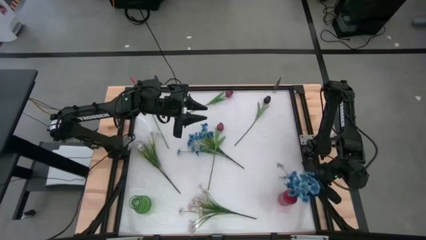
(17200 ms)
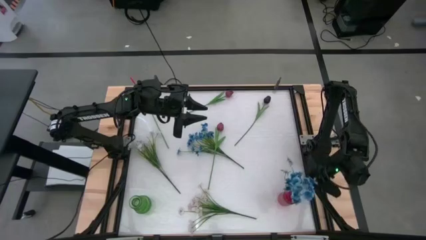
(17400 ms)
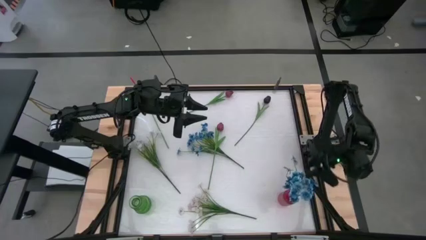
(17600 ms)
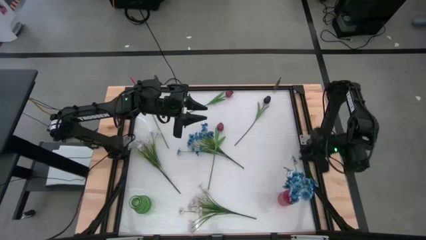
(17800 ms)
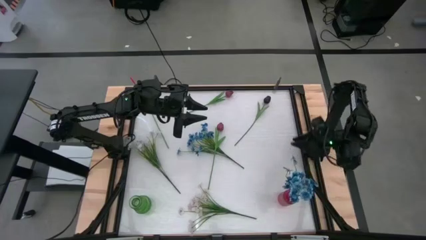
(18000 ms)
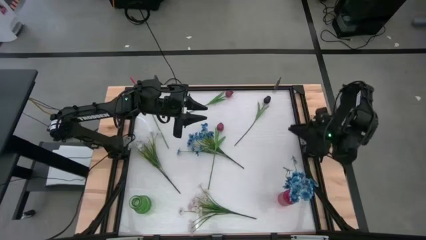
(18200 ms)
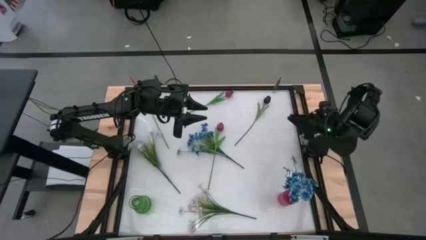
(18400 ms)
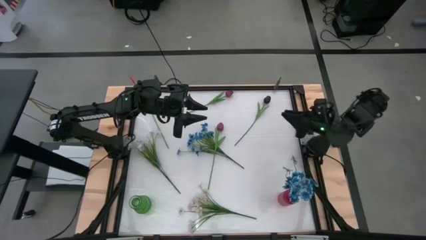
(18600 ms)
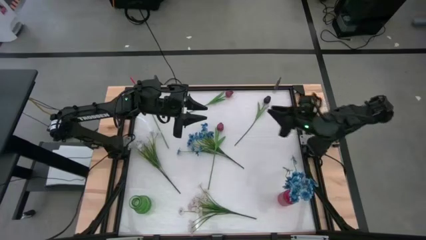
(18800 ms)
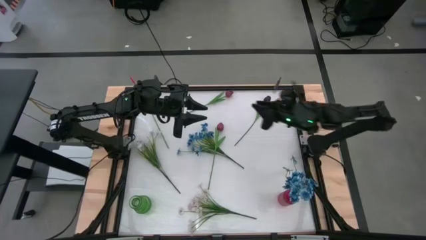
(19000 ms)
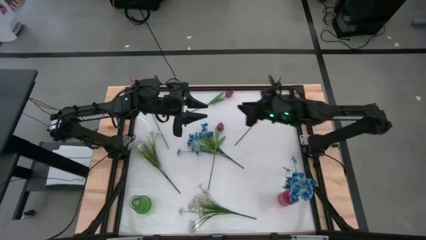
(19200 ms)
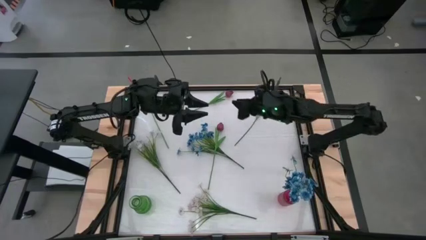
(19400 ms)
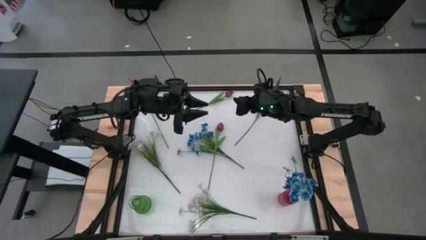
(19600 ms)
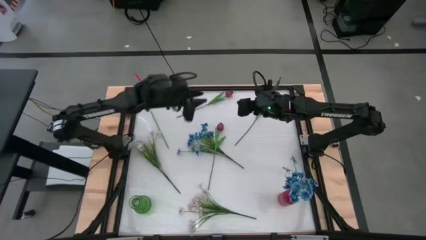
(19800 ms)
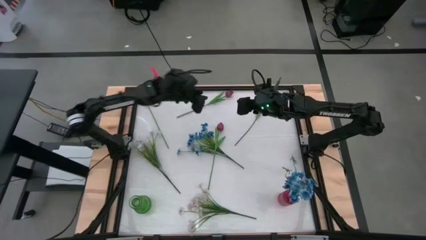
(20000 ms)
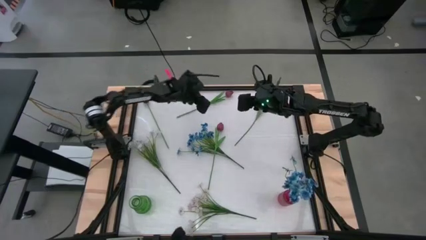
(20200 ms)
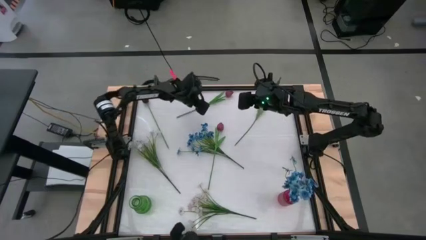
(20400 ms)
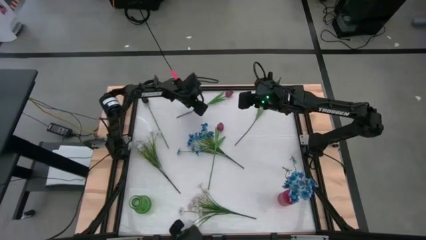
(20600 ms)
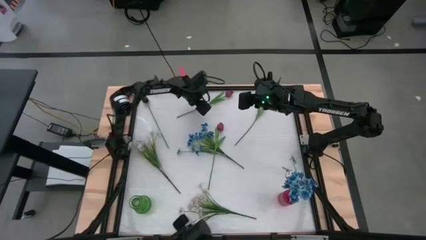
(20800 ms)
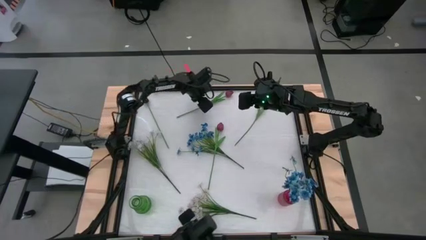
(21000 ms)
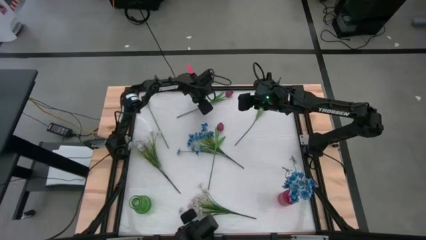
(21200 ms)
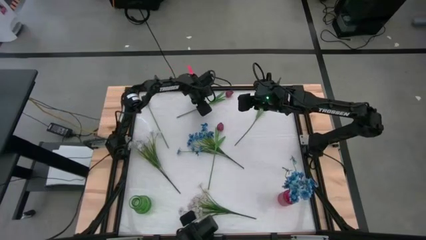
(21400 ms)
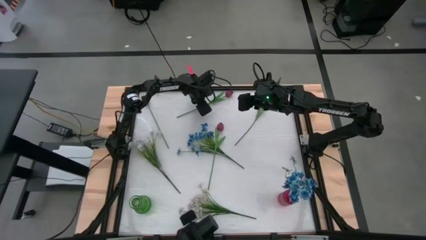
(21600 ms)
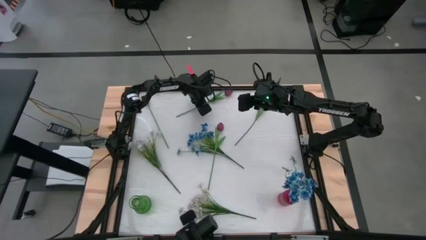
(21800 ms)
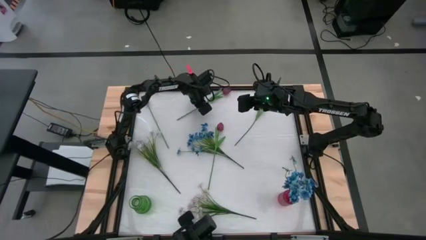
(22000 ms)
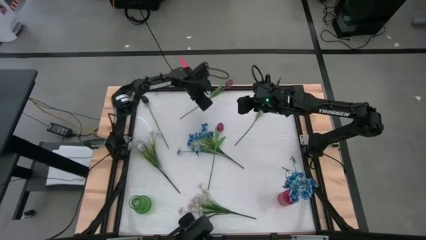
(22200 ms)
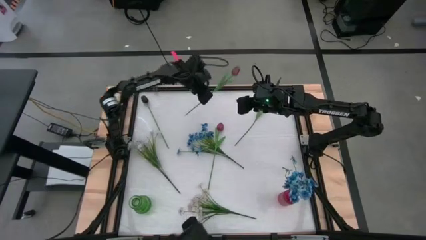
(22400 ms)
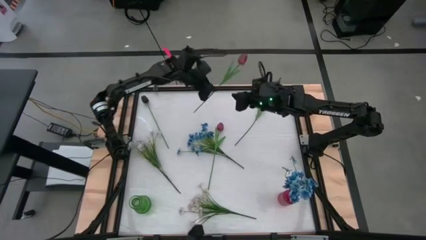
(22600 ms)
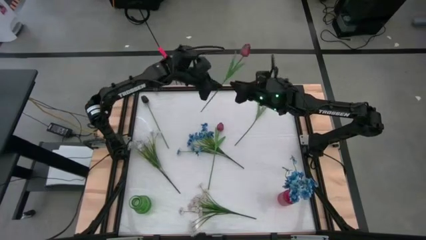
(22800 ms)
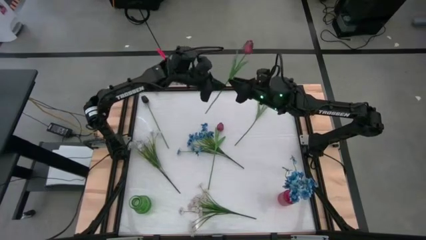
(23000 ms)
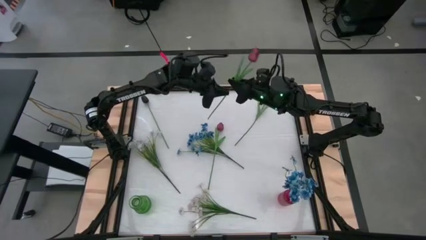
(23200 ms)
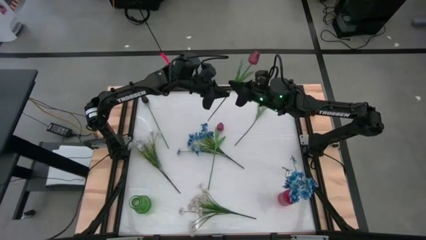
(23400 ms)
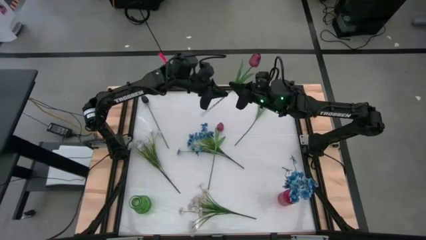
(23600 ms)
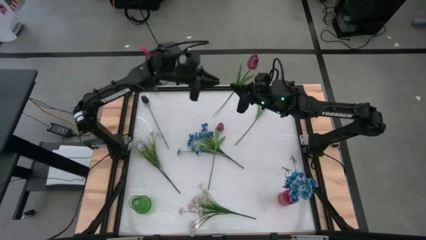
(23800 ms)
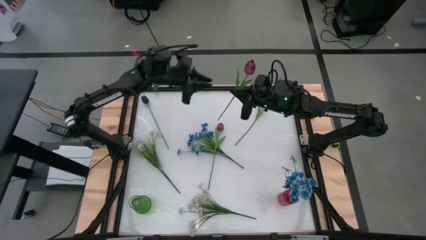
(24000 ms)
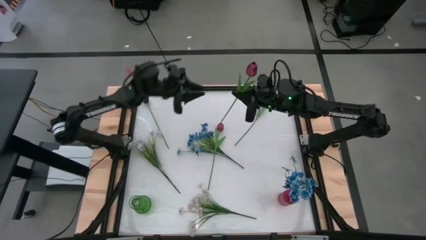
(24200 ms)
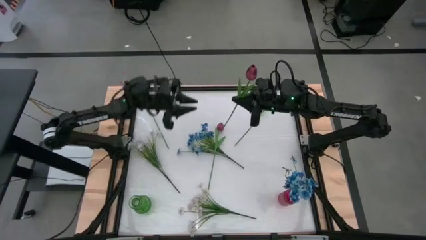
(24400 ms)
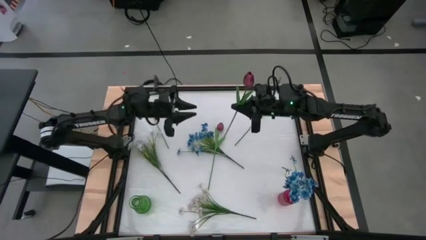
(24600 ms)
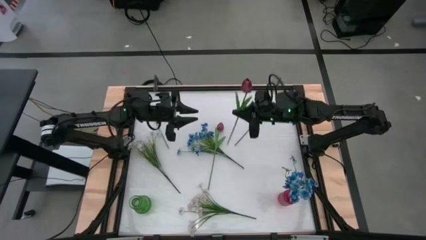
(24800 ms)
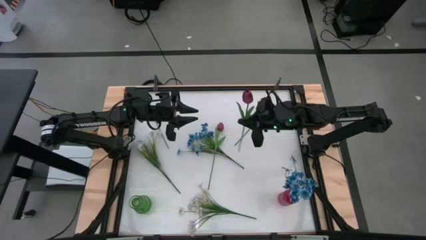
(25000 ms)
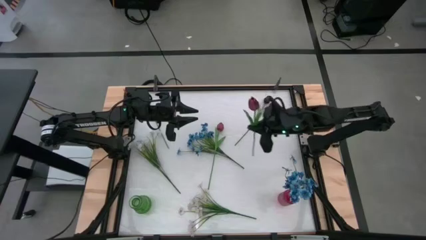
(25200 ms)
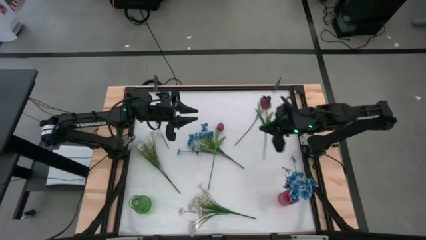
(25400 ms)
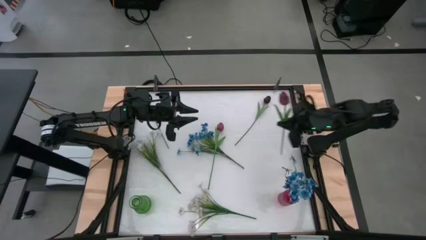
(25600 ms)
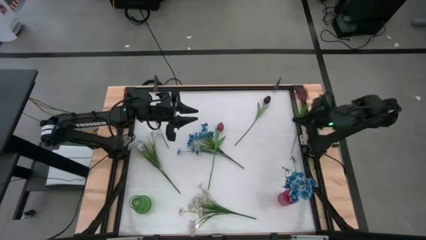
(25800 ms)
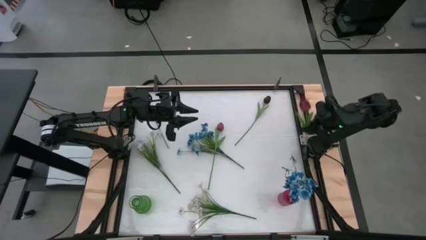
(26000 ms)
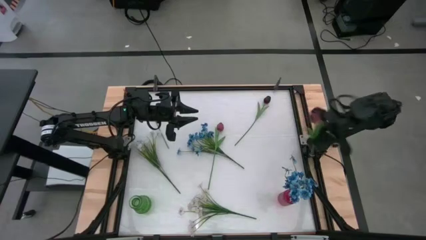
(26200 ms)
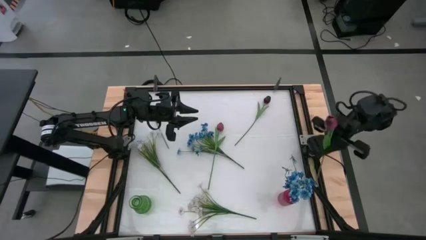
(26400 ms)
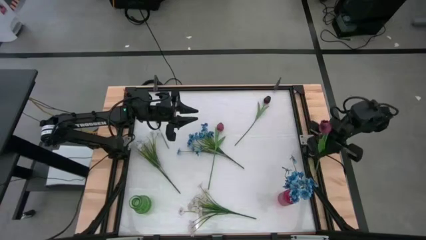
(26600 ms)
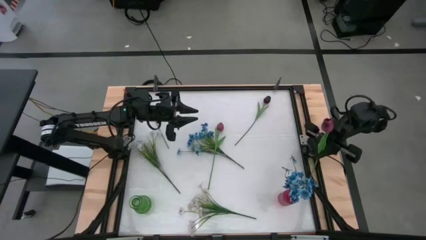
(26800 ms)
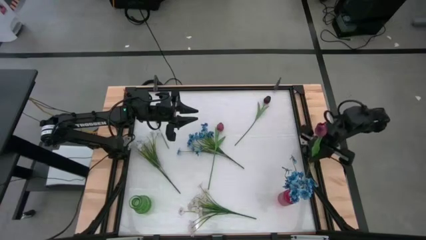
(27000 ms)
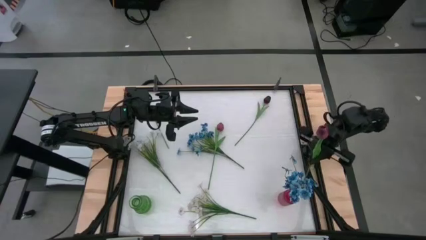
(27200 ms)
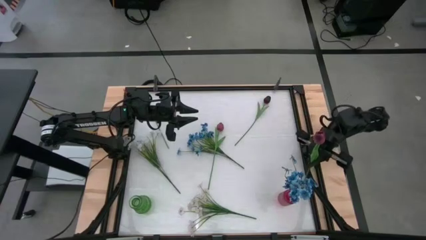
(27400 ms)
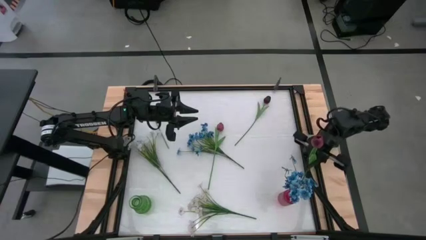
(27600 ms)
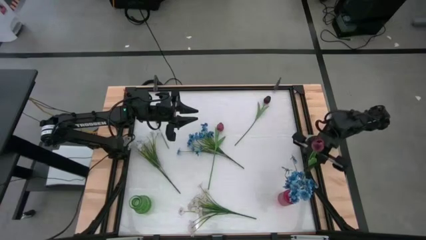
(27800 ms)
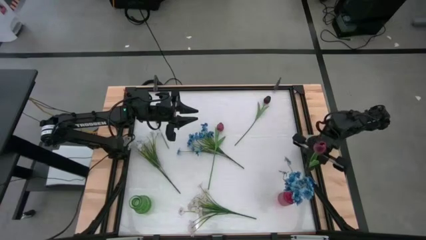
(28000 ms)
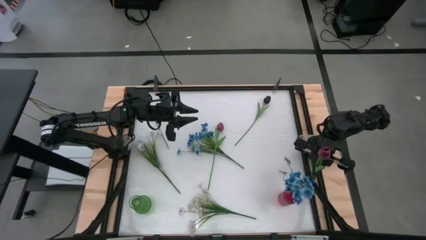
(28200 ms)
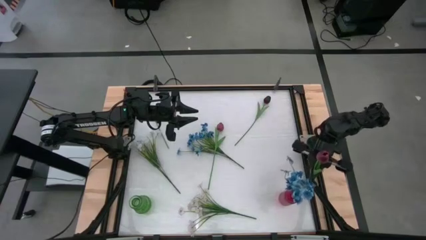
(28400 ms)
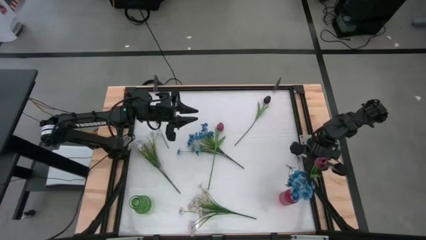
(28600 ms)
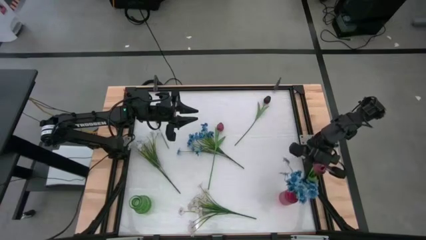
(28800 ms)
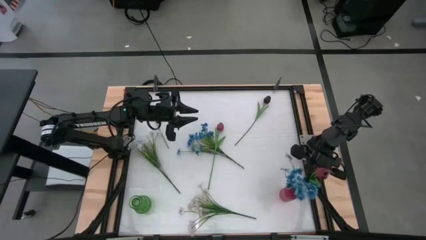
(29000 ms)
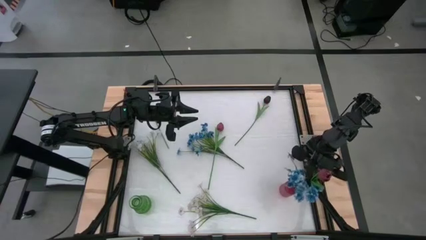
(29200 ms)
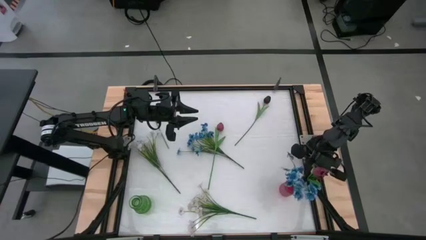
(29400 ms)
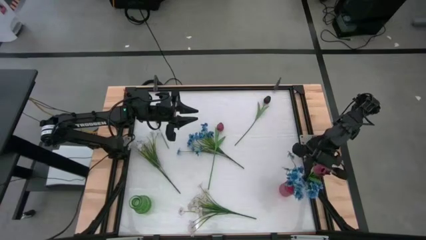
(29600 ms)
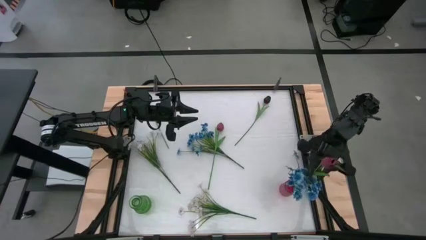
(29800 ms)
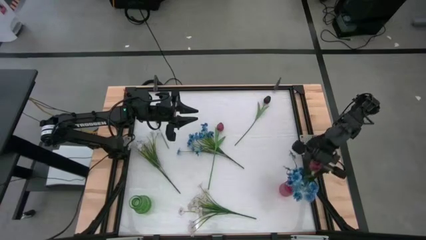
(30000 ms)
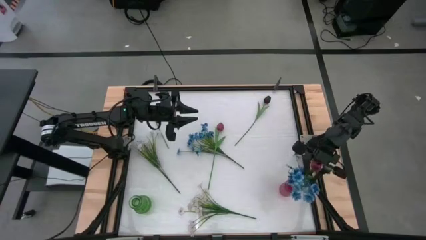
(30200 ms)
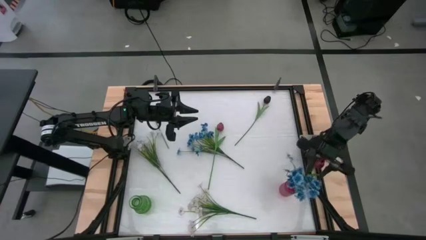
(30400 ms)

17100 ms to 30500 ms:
Task: Sort flowers into vase by color
Put the top red tulip flower into the red flower vase

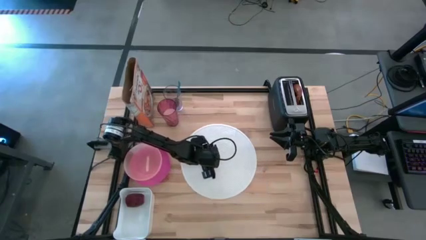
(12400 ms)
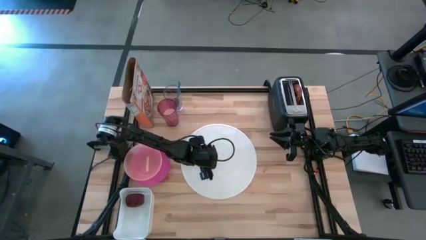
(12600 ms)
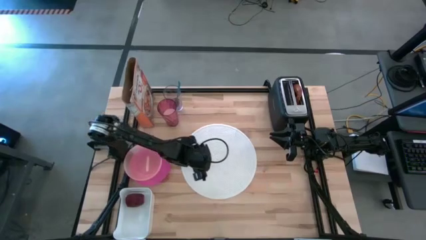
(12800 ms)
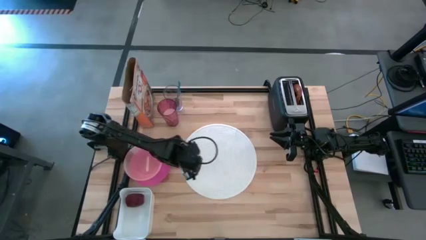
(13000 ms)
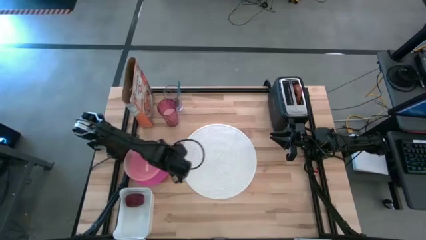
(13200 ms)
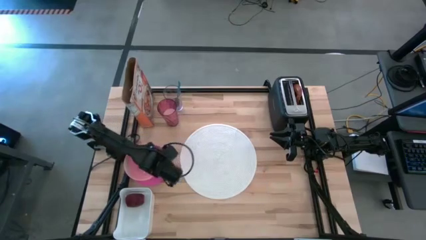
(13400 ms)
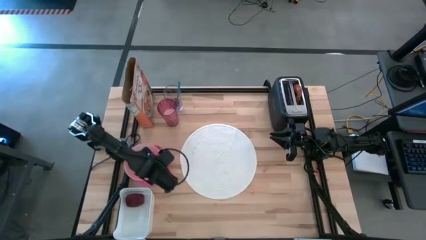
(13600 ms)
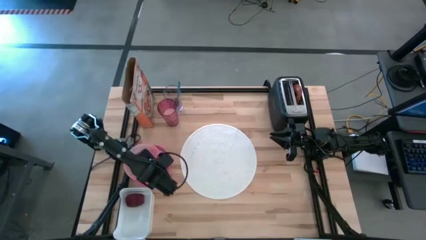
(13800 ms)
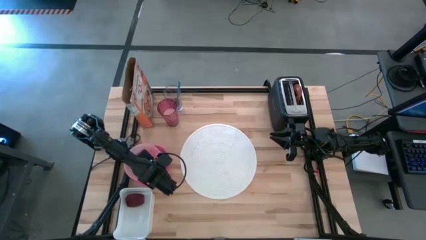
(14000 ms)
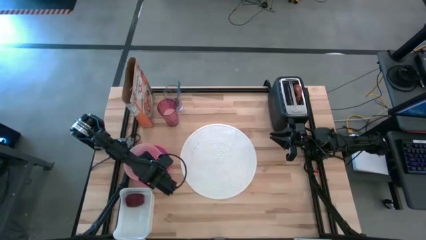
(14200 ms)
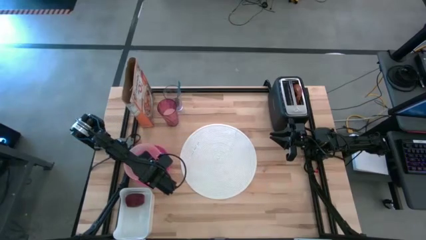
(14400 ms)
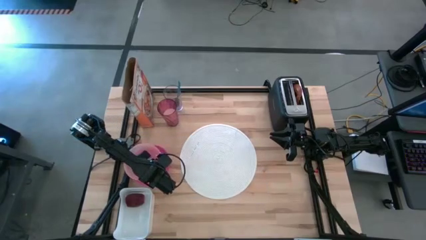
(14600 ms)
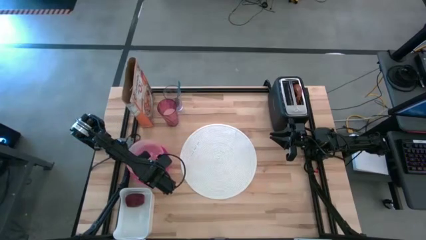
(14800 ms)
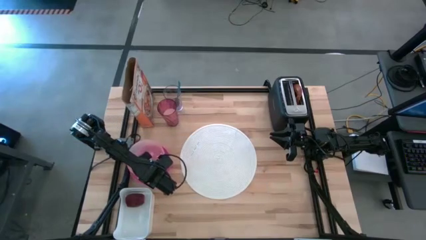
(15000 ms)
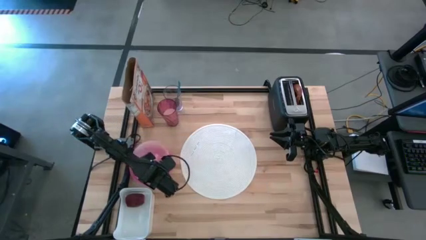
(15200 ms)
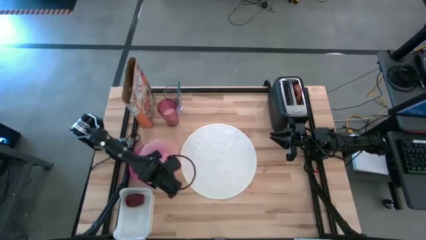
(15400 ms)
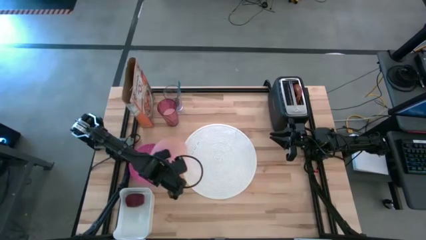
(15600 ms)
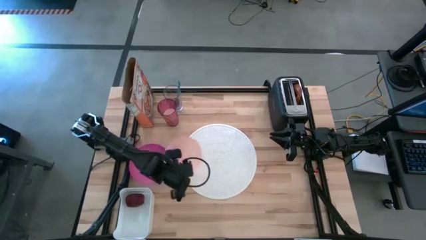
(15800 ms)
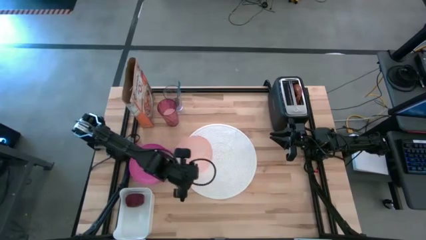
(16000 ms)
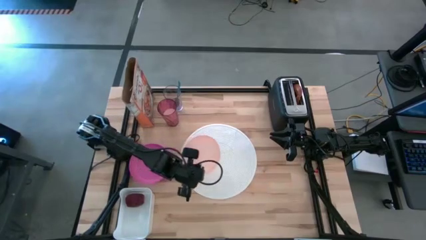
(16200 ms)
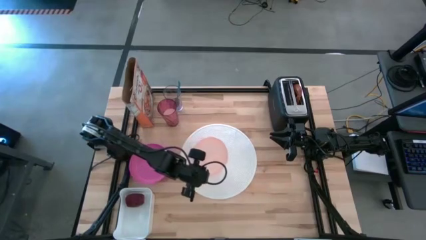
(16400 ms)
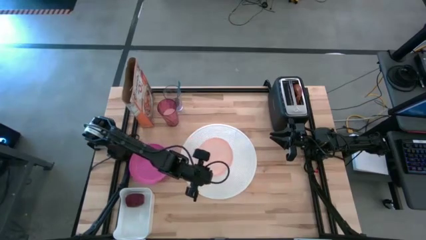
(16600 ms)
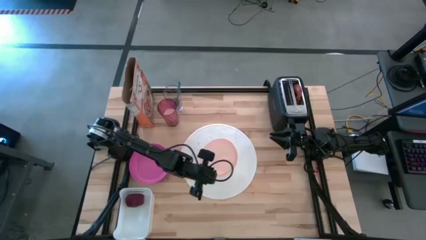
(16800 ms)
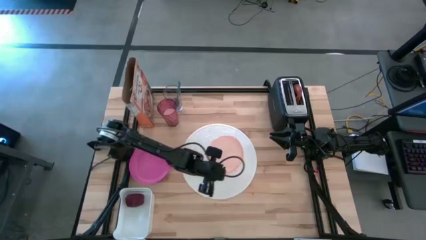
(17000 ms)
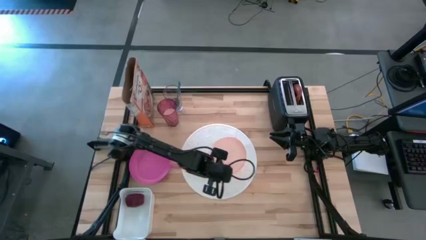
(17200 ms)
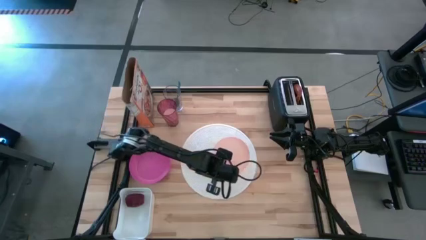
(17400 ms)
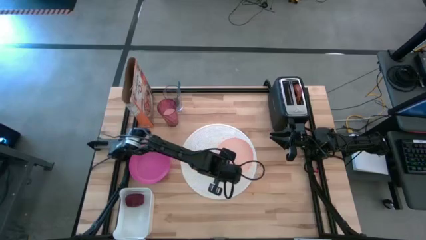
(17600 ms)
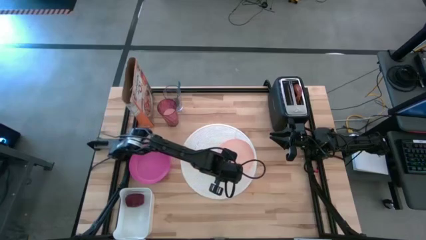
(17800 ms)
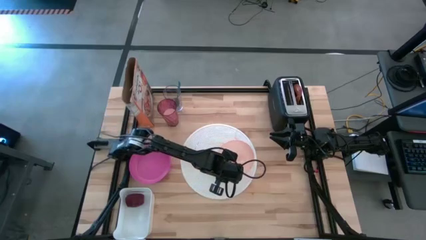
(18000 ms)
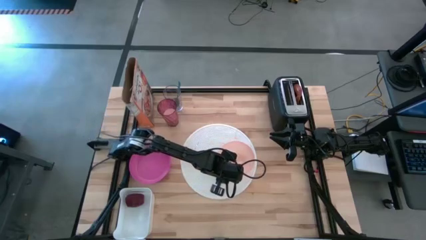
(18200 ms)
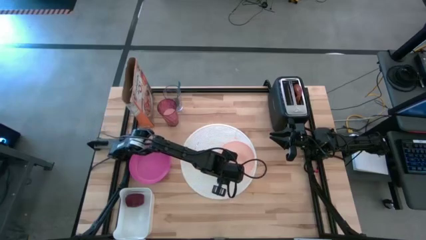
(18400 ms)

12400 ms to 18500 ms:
Task: Arrange a breakfast setting
Put the orange bowl on the white placemat
